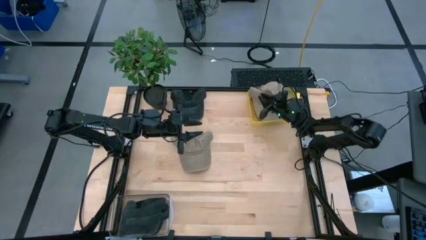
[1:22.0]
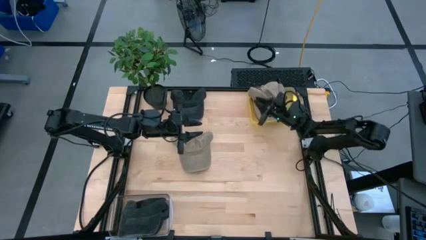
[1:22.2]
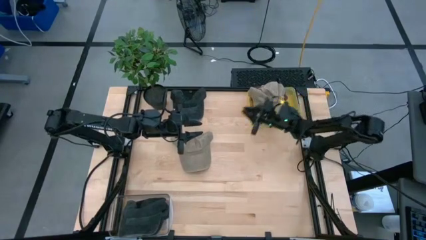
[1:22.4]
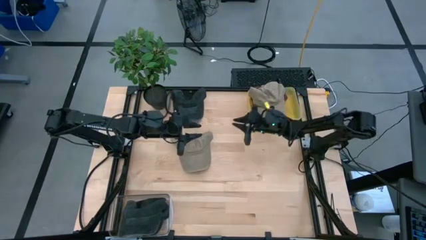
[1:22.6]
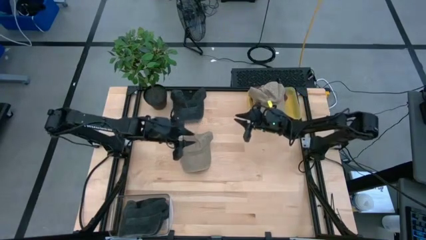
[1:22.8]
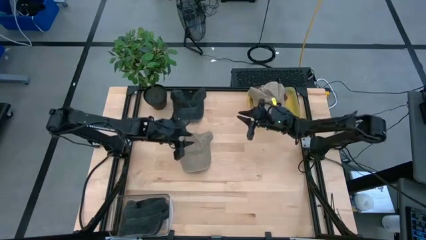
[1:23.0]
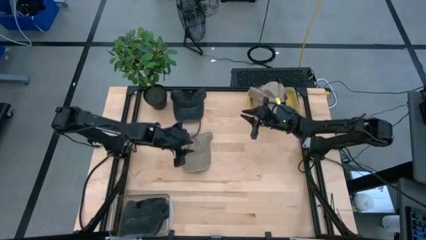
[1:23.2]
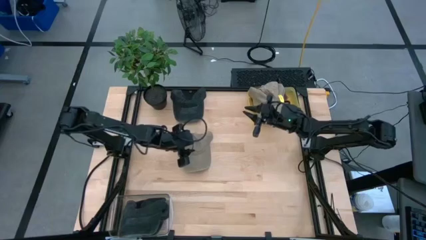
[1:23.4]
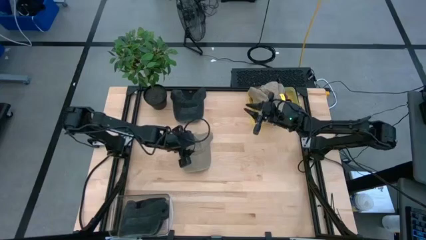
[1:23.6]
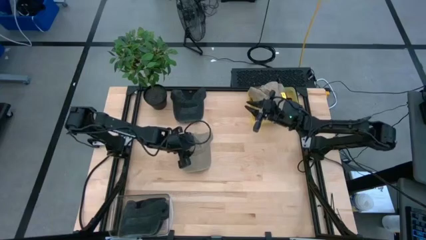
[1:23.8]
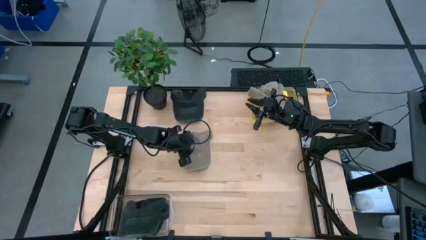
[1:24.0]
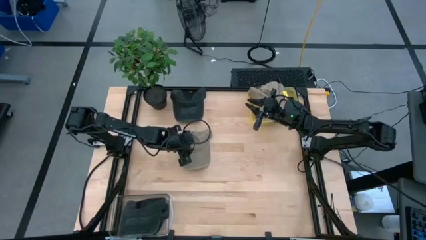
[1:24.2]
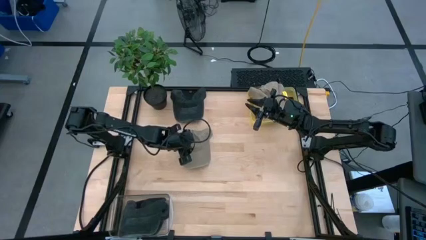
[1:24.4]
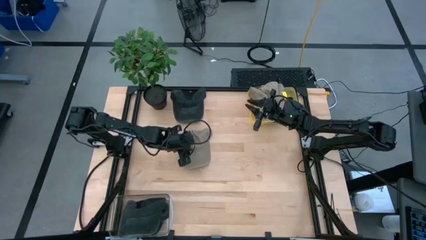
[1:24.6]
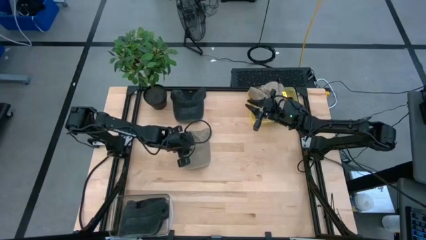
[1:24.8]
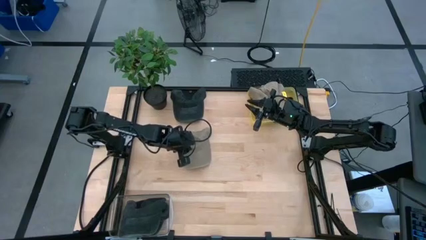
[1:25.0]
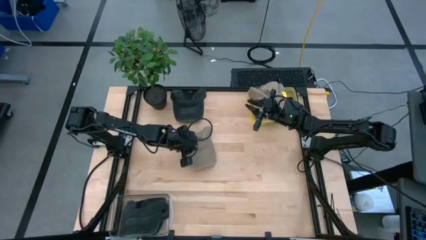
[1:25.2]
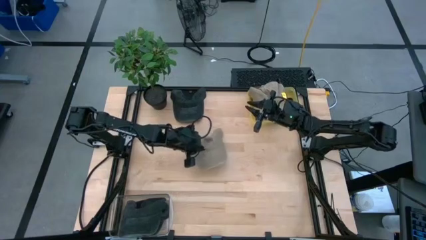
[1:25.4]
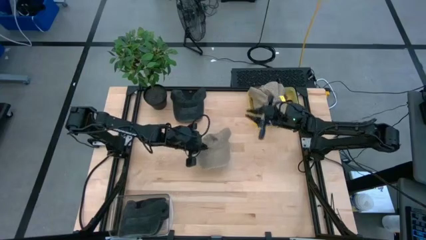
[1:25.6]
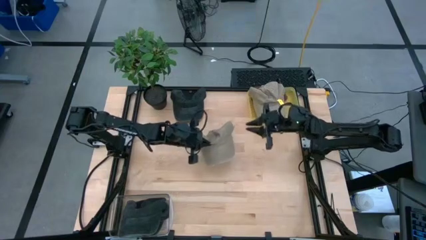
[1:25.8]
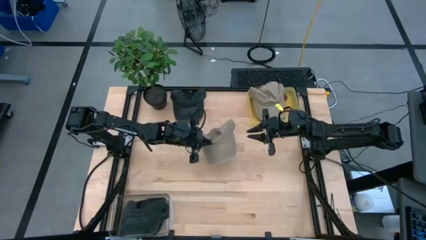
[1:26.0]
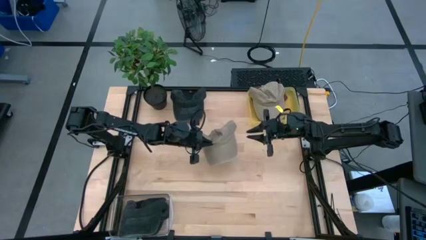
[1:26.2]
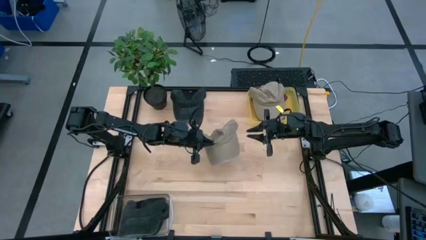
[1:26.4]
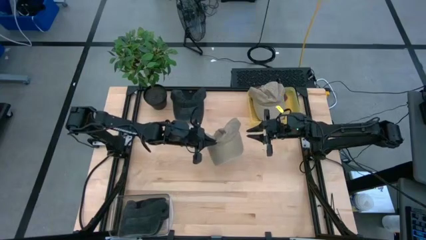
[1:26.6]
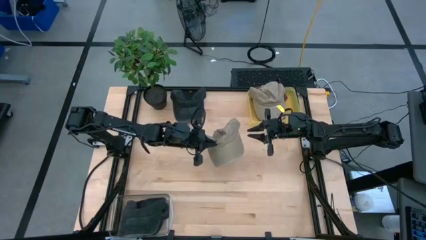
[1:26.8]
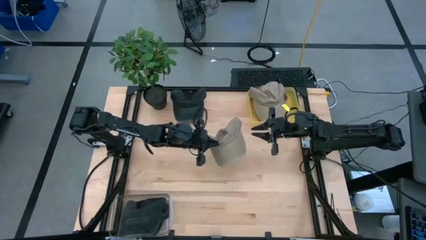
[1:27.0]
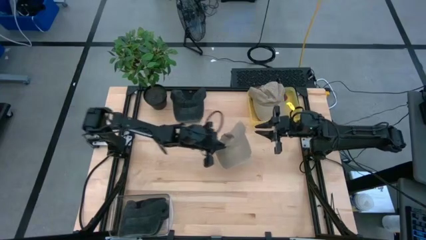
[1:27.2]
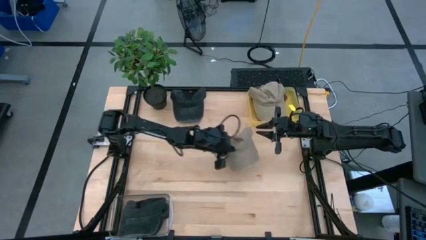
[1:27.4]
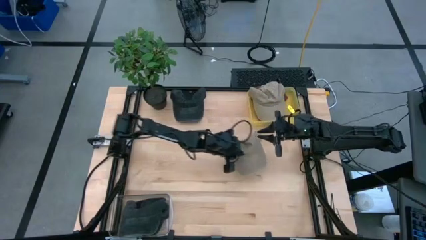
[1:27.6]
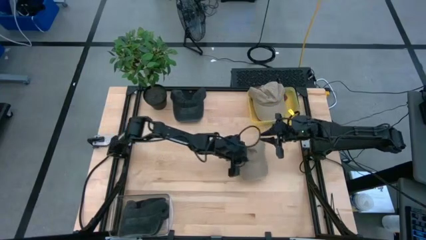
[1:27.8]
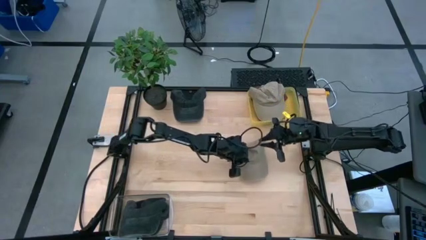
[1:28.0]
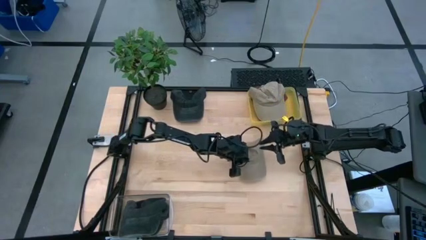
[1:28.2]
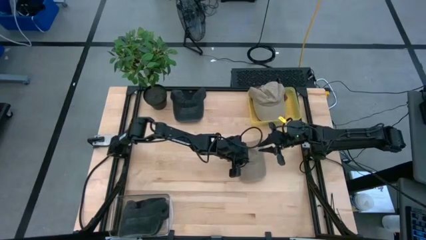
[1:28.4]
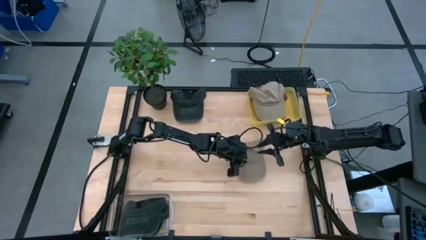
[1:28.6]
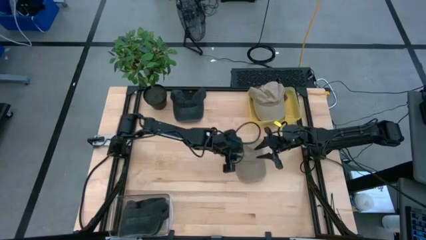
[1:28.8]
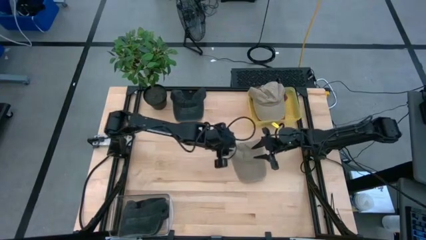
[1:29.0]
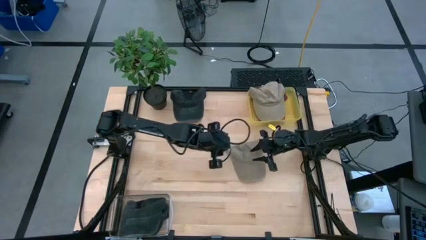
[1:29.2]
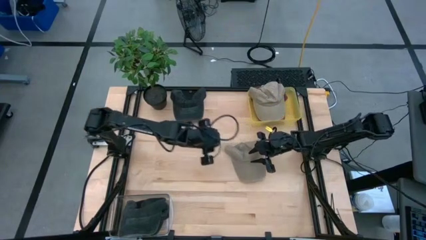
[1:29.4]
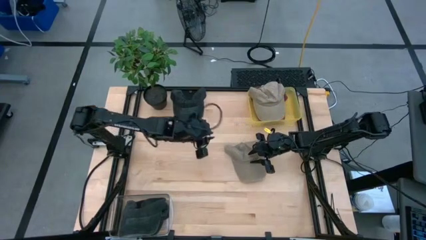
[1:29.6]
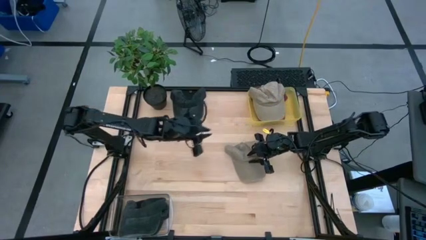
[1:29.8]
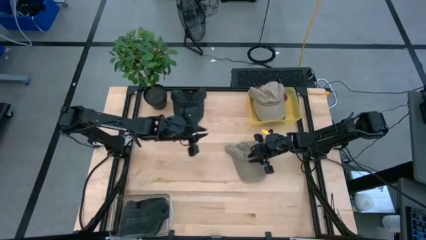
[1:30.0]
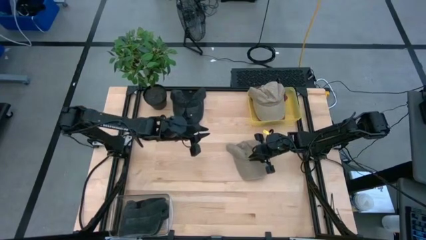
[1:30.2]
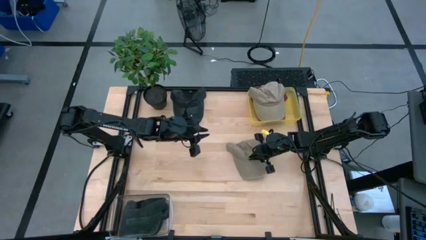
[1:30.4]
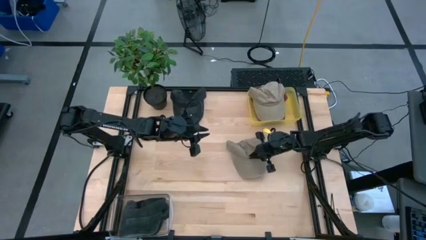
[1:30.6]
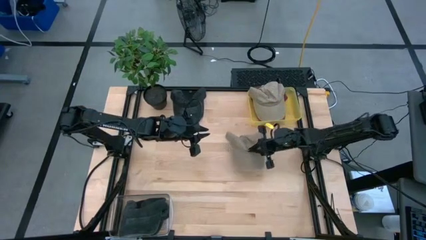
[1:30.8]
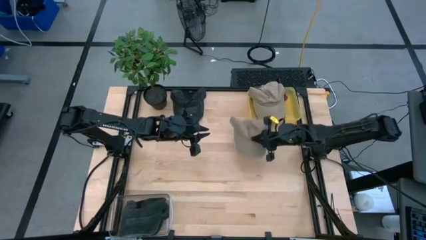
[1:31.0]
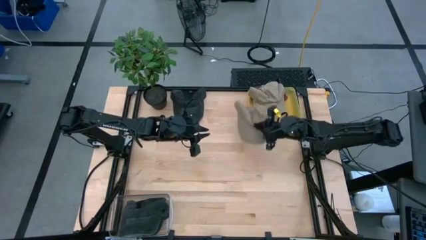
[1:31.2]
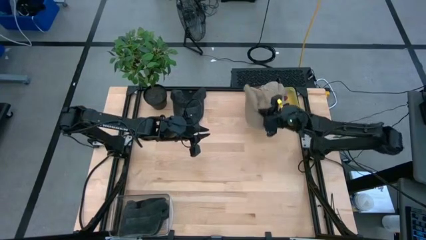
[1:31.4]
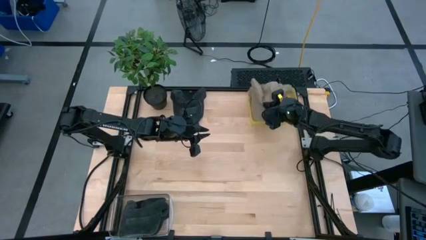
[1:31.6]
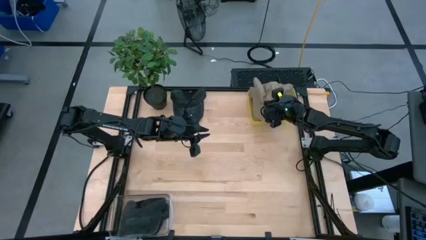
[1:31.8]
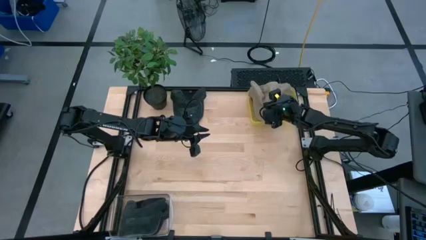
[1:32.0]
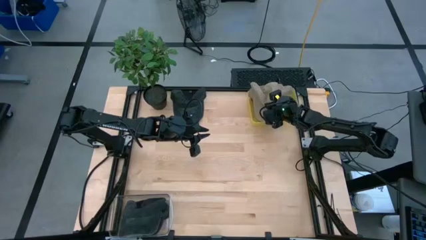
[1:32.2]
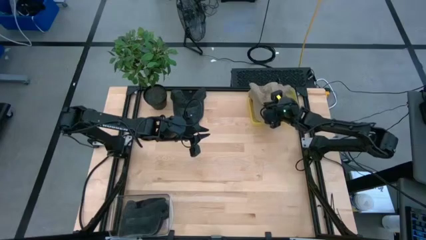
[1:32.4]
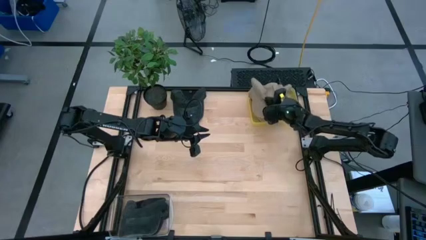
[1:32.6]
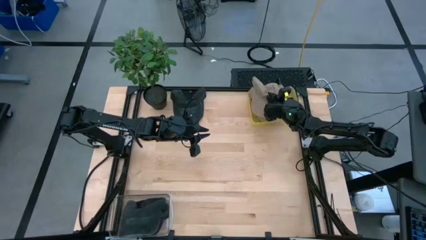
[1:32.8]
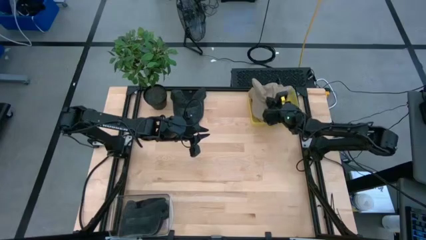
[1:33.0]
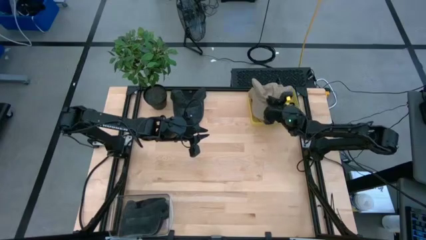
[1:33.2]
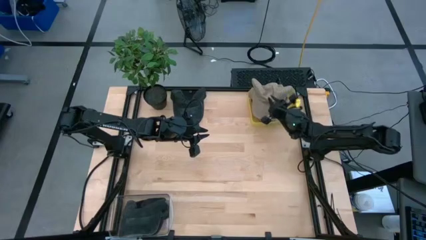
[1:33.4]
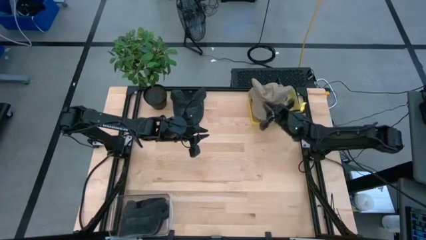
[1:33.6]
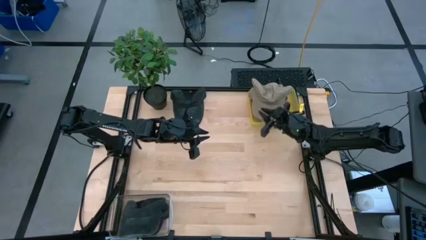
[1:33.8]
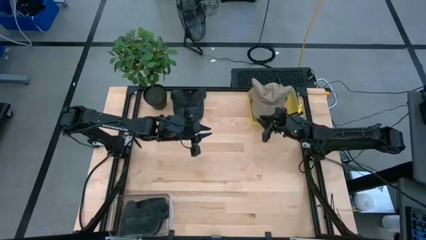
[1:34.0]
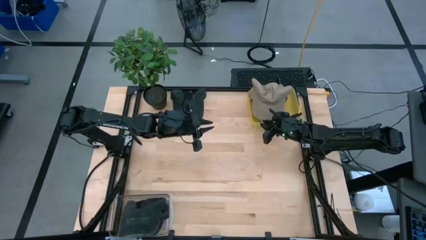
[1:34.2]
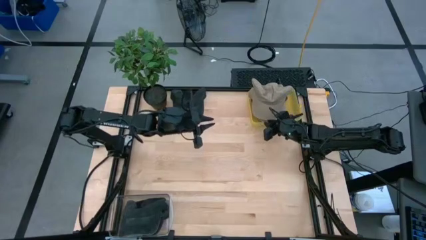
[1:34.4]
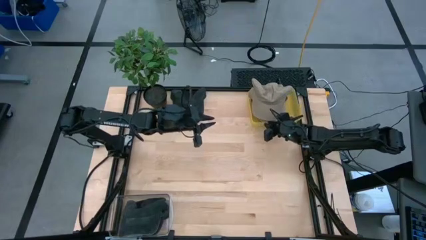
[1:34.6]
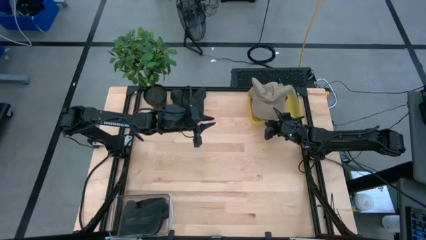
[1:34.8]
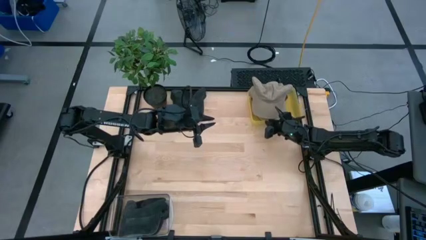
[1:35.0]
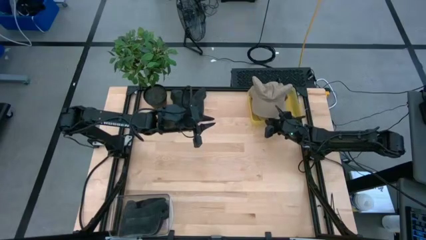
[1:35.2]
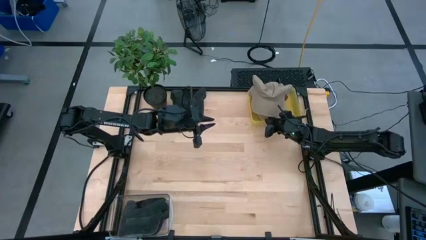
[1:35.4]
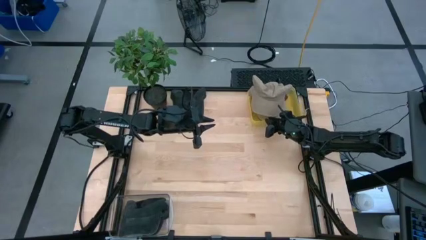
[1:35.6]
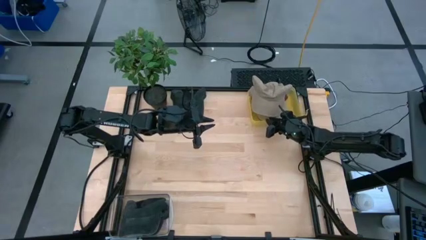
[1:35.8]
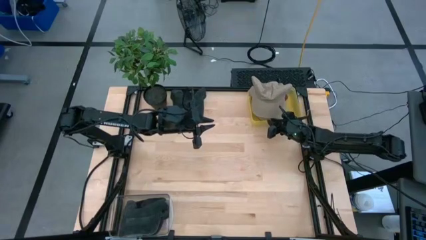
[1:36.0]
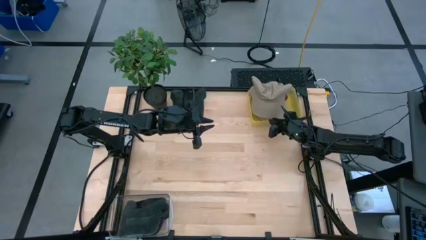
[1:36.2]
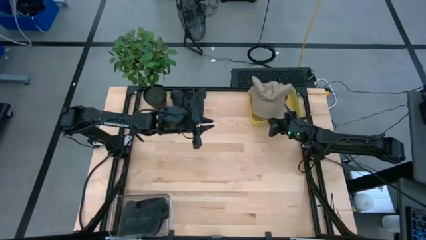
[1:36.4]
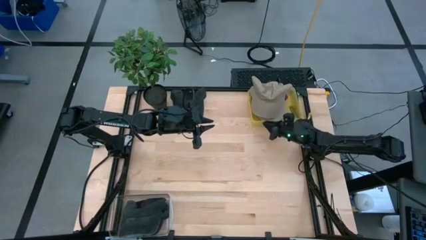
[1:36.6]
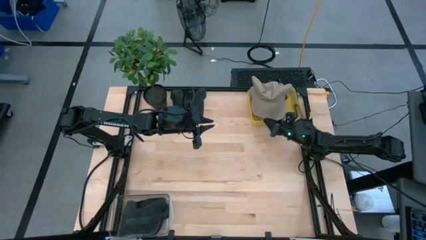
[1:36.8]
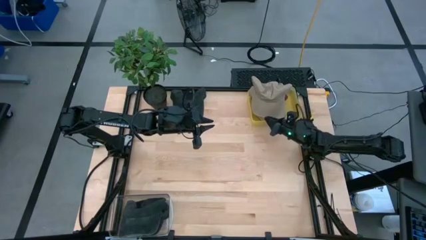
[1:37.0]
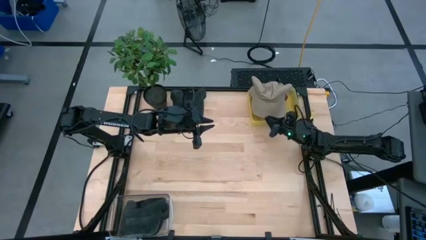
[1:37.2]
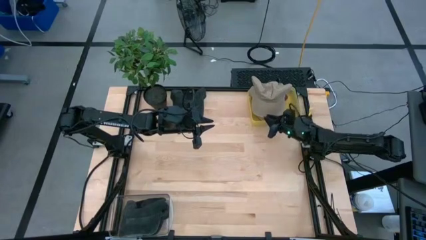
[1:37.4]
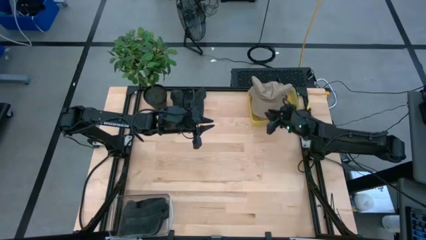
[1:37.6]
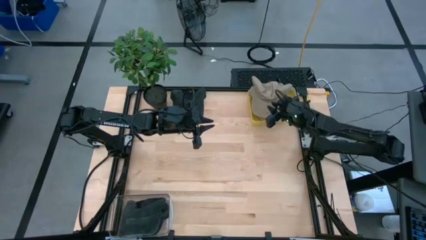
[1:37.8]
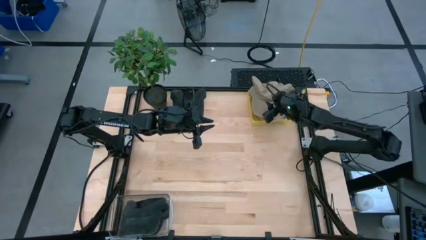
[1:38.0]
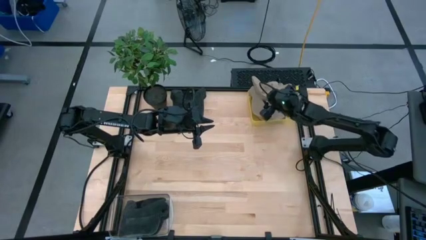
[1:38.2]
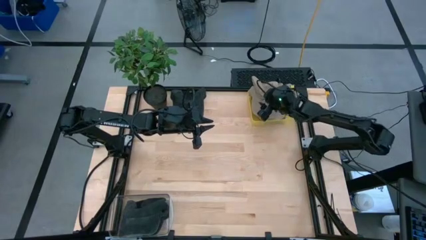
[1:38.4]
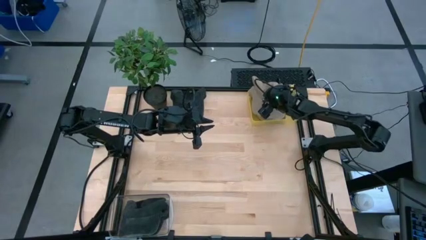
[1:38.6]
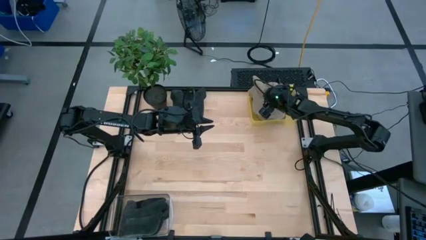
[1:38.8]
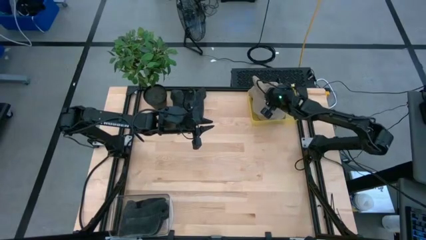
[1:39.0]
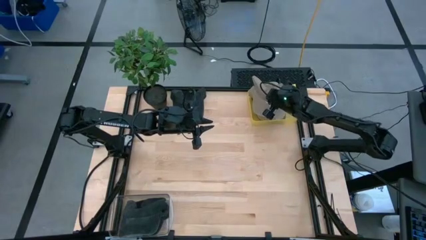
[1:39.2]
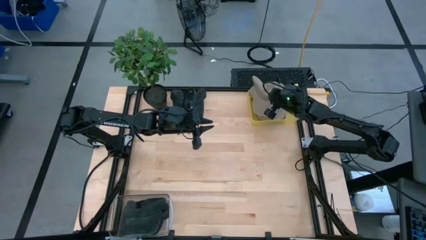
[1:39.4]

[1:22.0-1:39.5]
Task: Pick & Place hat
Put the brown cap into the yellow bin
